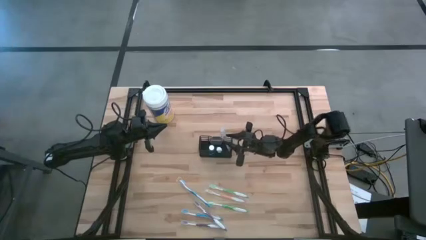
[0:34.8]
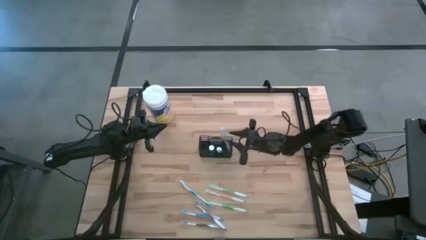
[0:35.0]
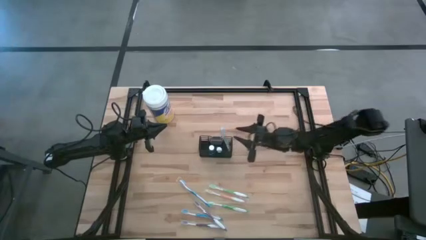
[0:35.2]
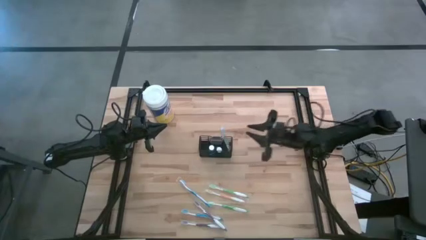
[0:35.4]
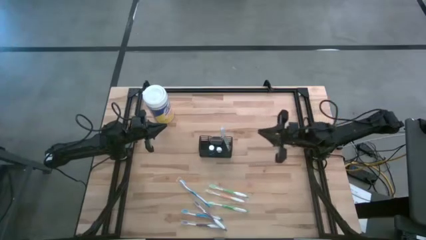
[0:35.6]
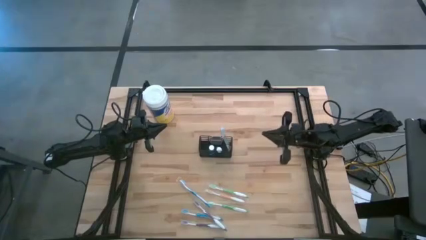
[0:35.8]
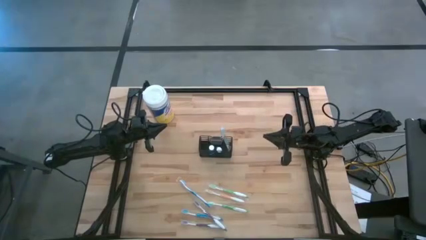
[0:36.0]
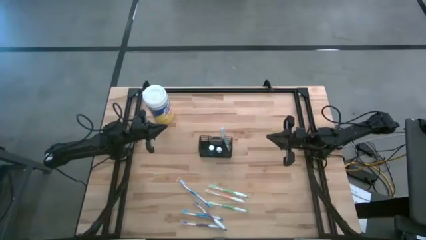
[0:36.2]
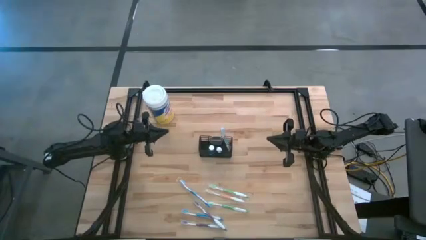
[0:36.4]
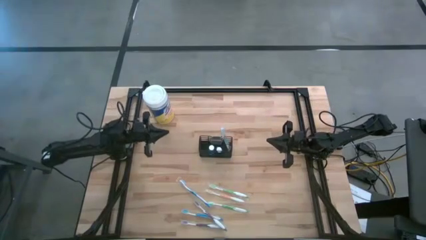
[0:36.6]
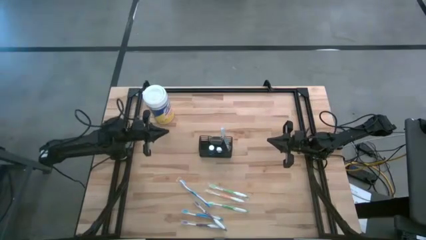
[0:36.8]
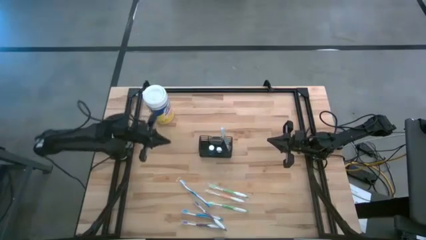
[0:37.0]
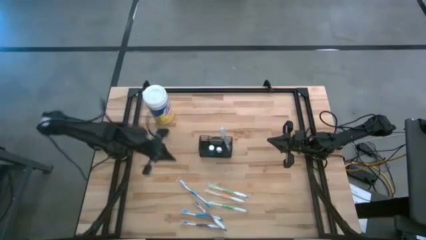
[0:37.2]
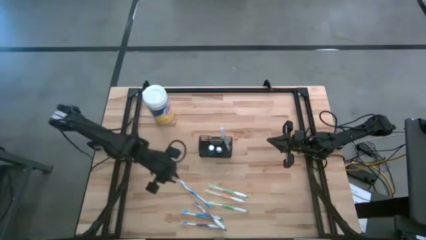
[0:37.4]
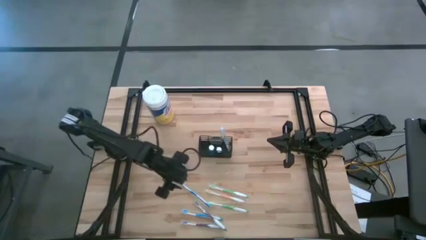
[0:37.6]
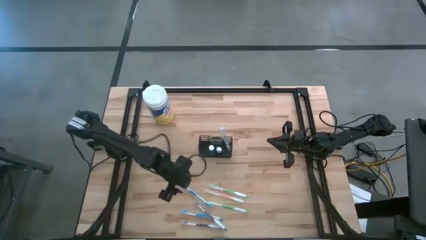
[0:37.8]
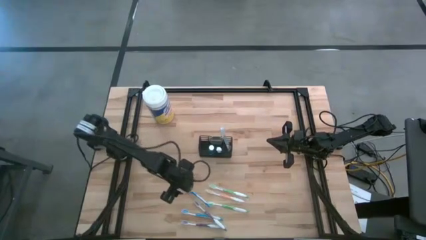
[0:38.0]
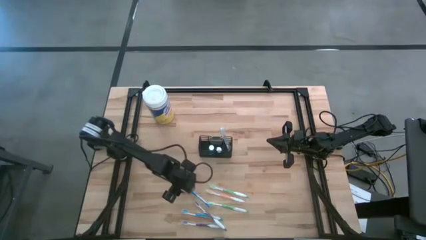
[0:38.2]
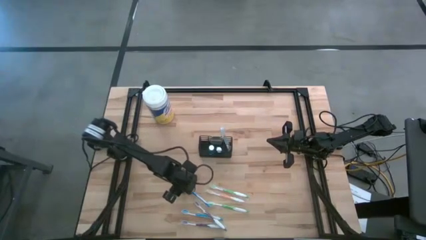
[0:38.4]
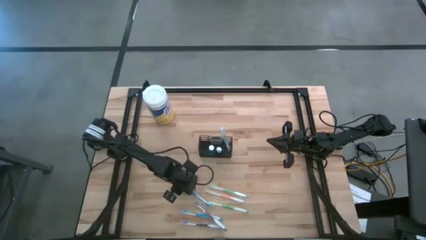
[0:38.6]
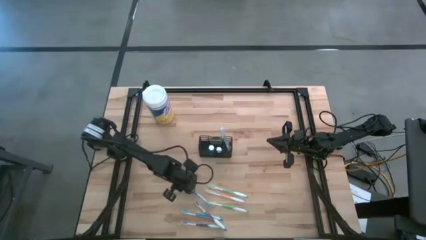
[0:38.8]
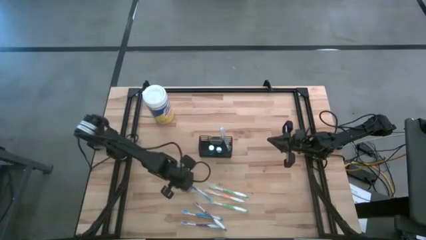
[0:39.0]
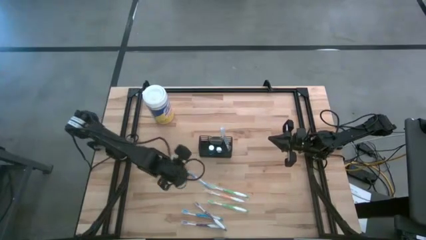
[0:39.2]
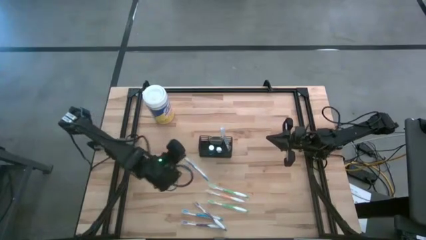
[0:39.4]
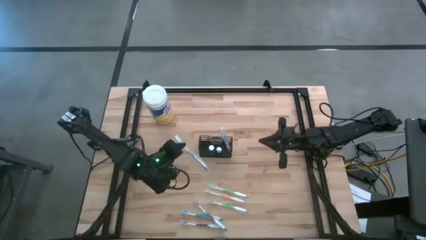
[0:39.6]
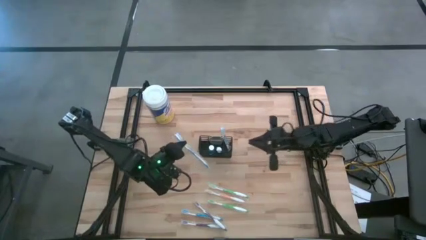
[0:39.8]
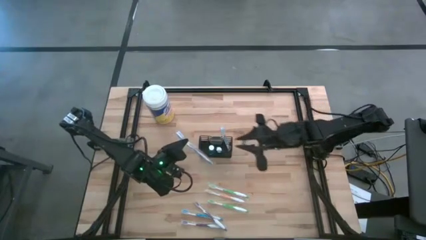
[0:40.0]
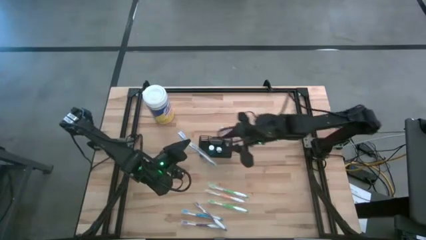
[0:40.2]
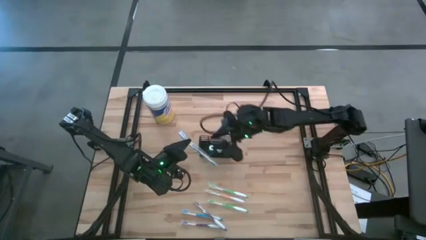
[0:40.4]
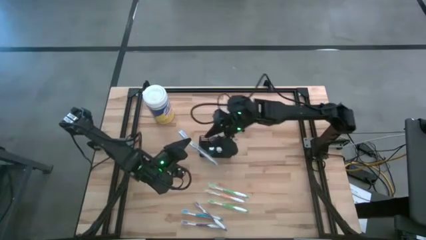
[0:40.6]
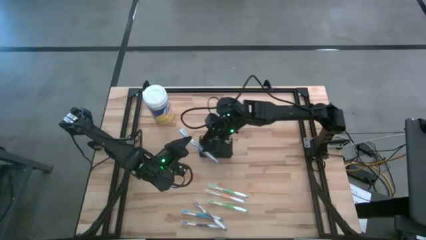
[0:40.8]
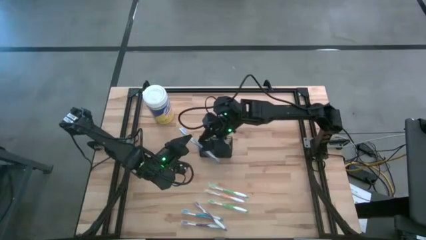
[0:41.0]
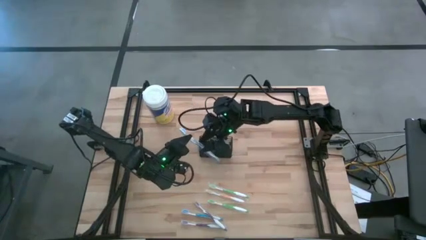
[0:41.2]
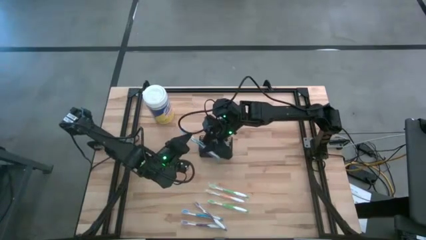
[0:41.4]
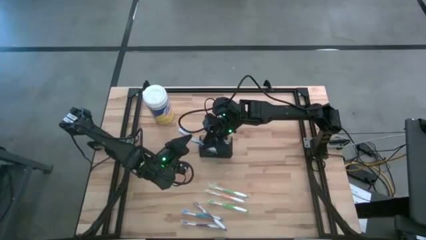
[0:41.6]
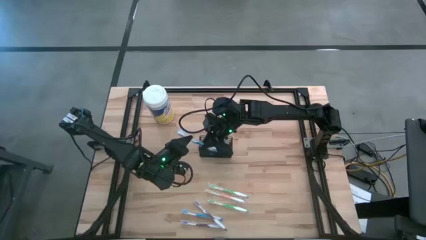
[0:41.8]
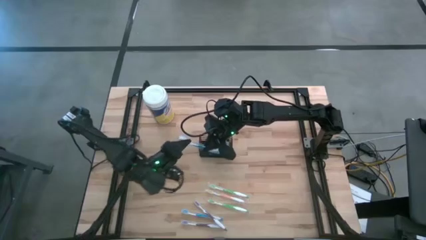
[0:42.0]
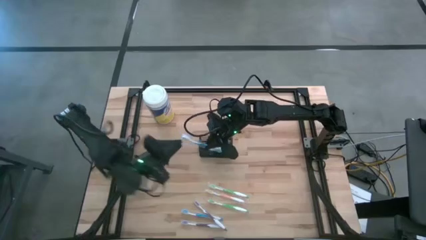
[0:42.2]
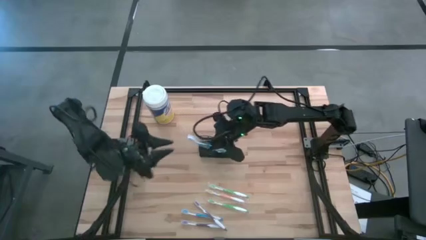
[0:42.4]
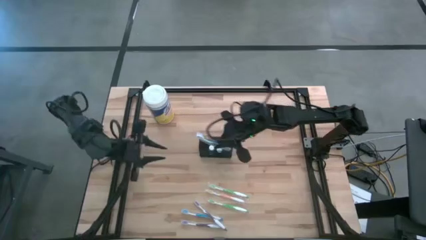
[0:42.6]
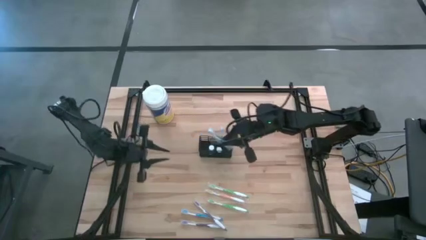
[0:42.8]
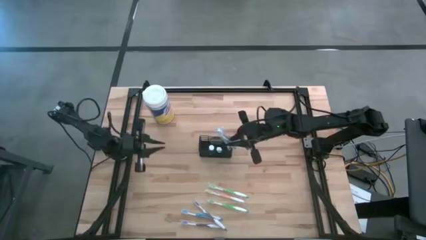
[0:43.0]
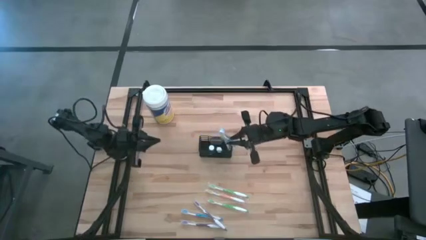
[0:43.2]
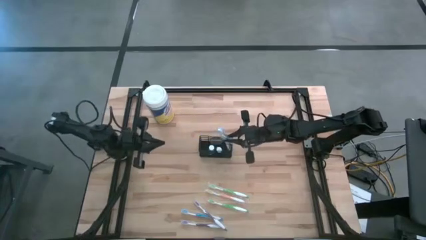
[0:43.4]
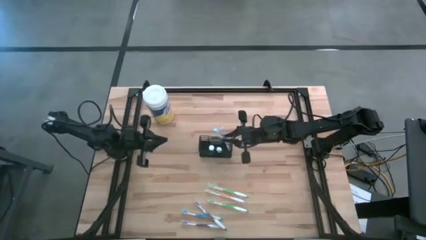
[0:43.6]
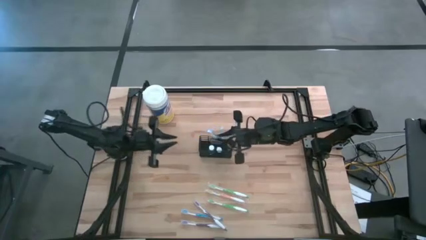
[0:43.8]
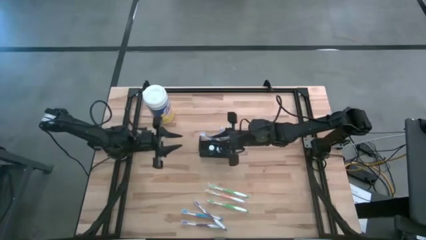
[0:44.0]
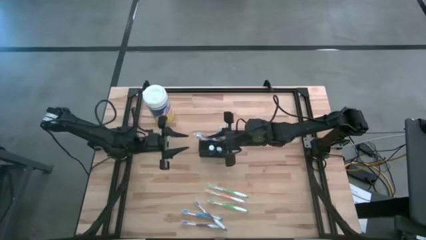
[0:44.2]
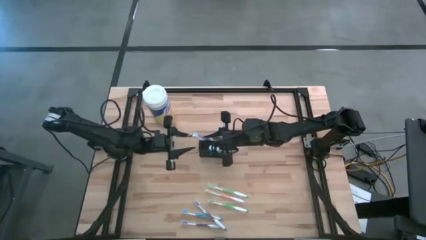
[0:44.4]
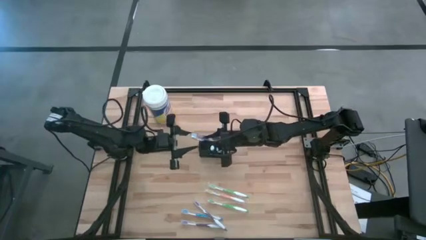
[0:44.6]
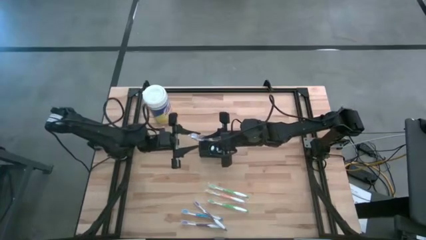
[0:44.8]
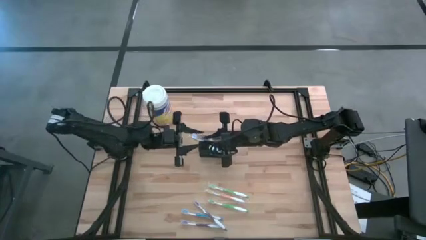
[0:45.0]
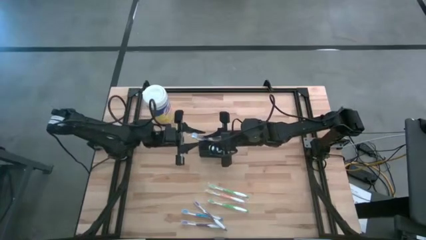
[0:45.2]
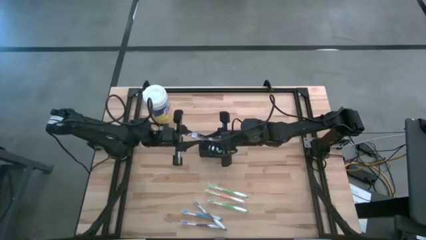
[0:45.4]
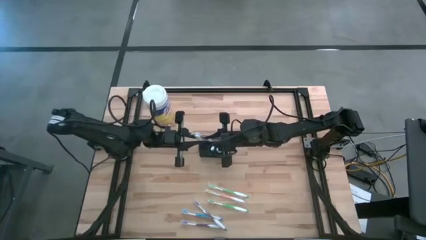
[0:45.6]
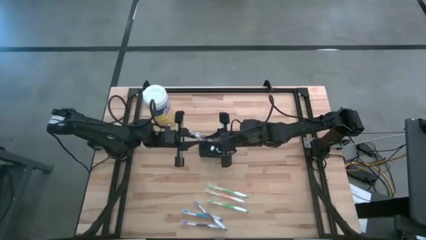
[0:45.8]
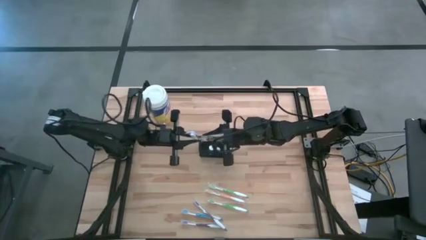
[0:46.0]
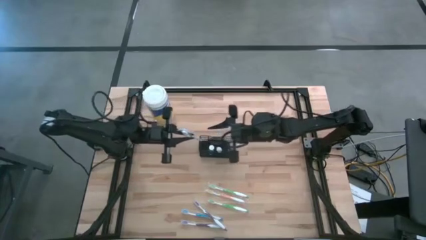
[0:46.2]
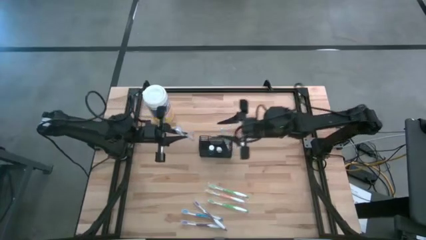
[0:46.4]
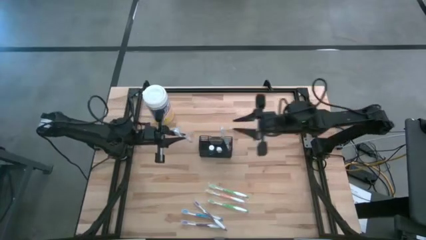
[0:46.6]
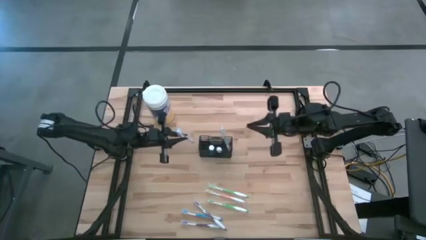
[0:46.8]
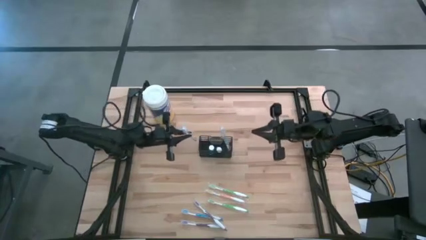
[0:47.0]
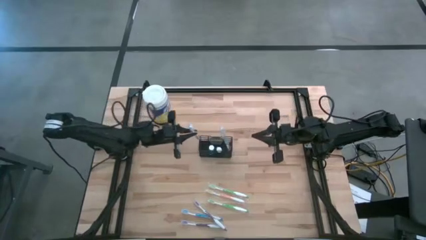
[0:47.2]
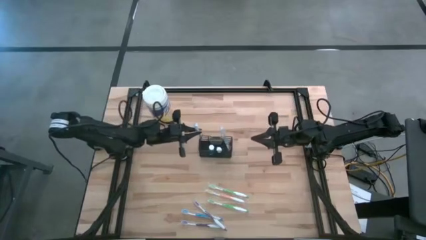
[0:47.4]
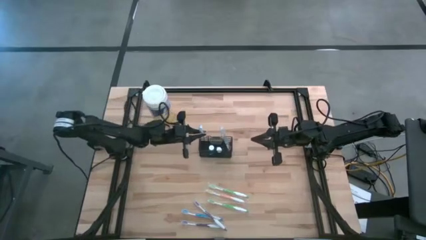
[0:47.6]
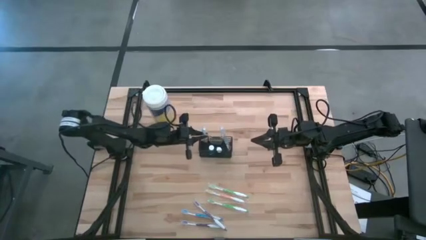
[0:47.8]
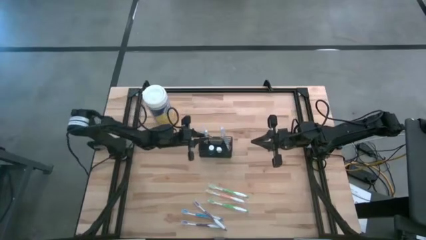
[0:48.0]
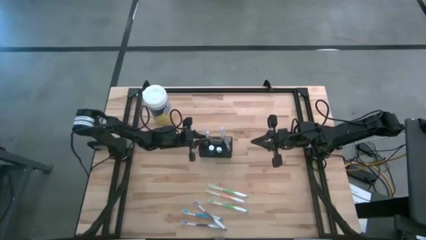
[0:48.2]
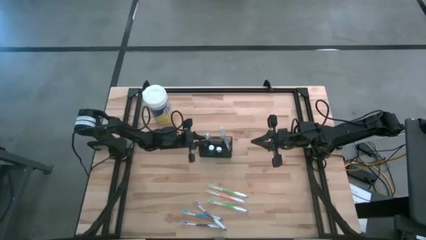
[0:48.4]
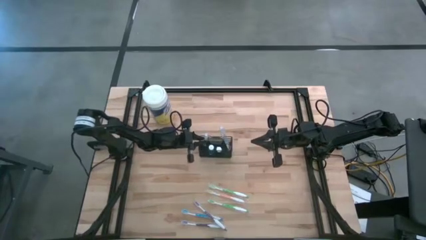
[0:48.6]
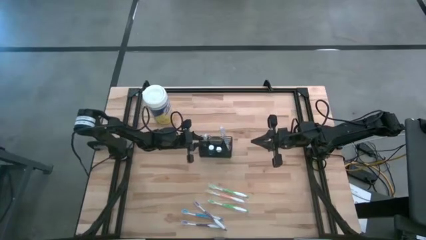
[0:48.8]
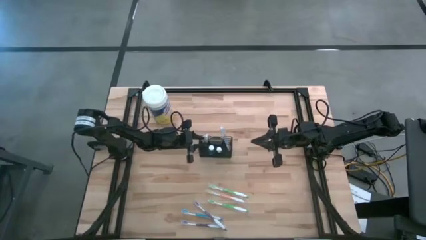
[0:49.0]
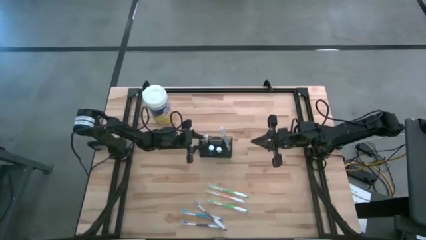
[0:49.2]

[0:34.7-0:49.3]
Task: Pick & Place toothbrushing station
Put the top blue toothbrush into the wire organizer

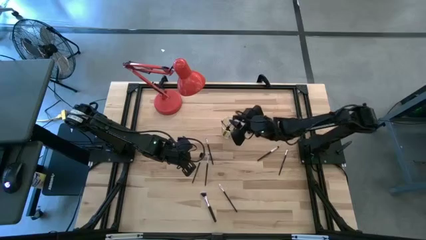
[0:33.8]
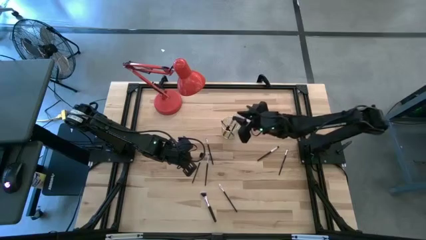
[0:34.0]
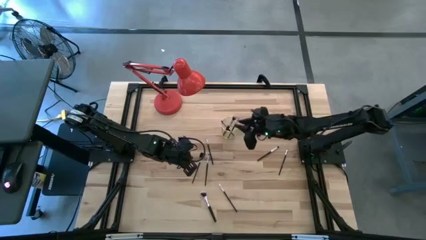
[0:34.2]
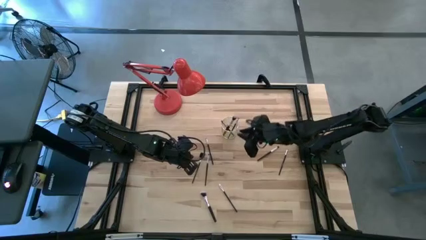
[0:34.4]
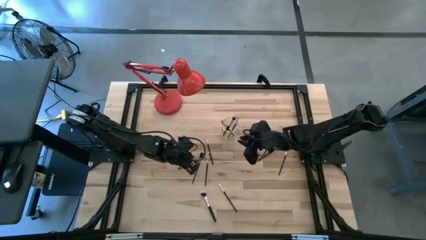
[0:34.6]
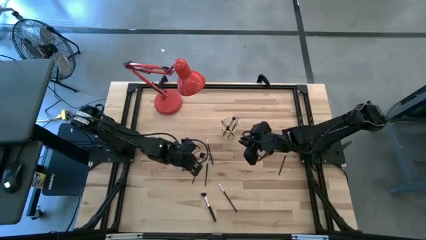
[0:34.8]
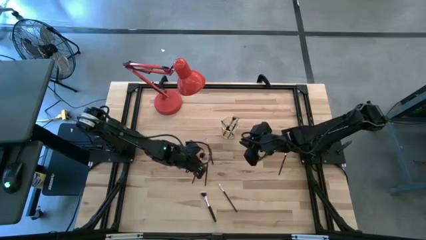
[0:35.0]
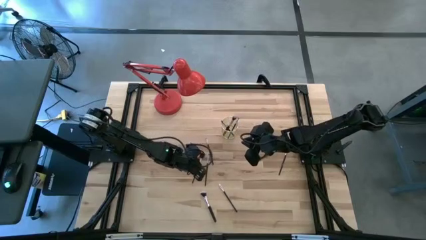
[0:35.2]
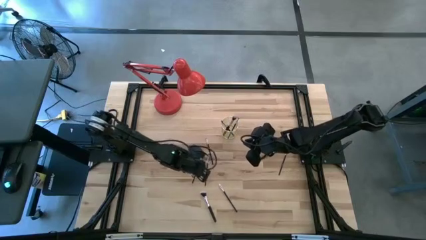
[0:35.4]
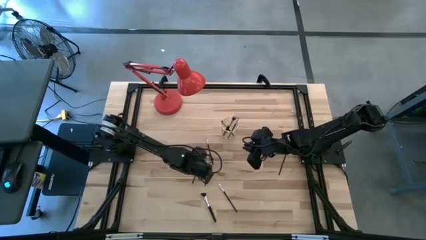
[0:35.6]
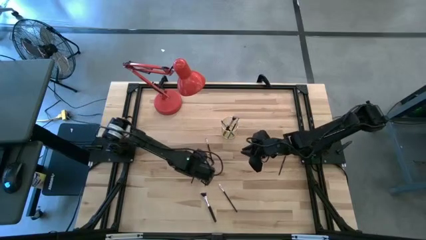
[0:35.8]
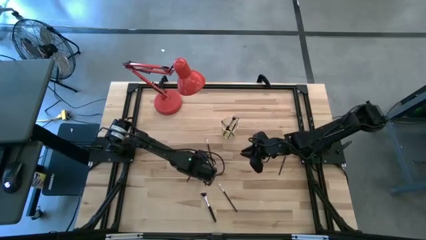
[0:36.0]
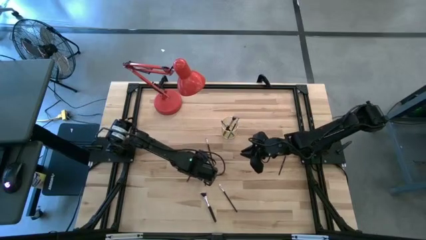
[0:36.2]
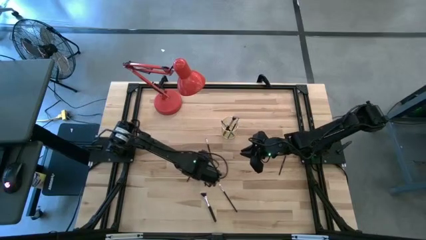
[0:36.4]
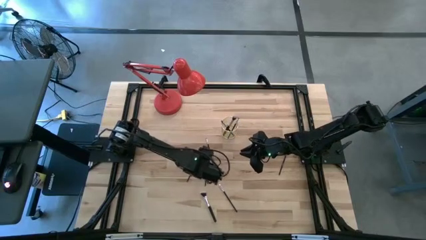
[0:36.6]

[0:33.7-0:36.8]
Task: Put items in baskets/containers
Put the black lash brush into the yellow container
